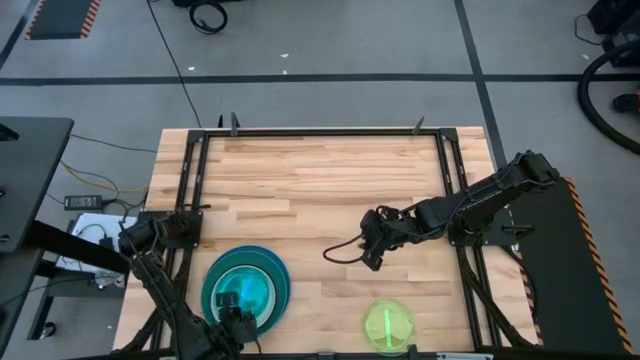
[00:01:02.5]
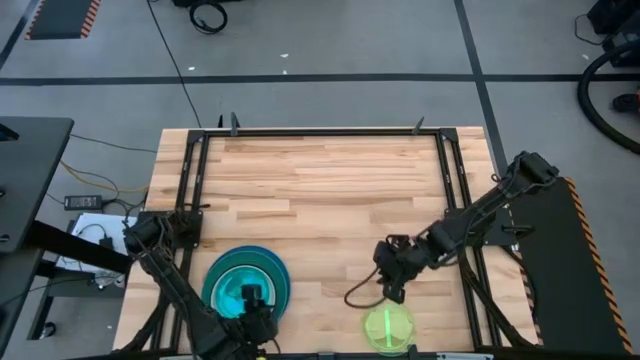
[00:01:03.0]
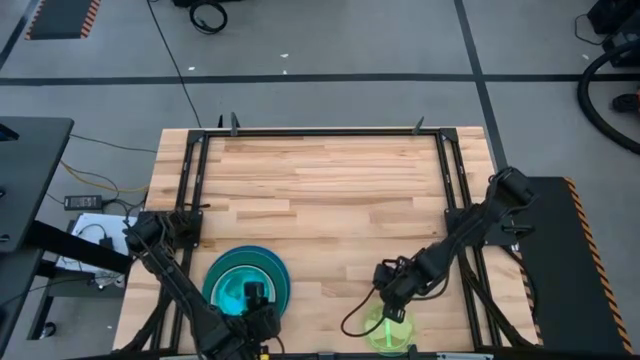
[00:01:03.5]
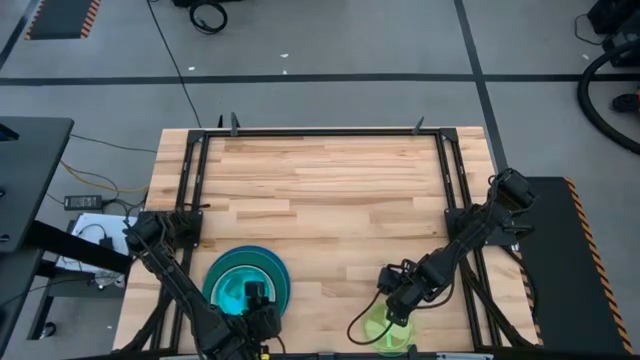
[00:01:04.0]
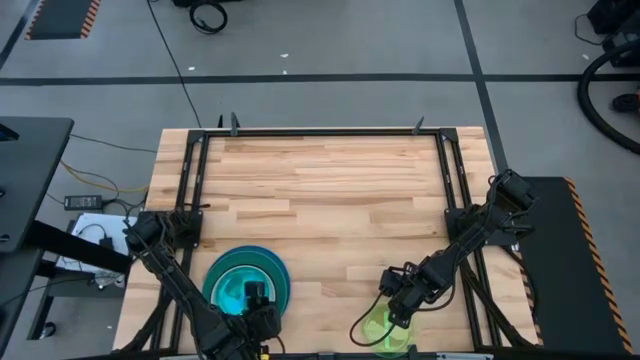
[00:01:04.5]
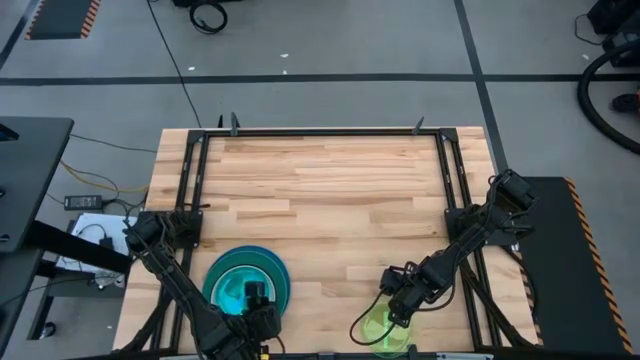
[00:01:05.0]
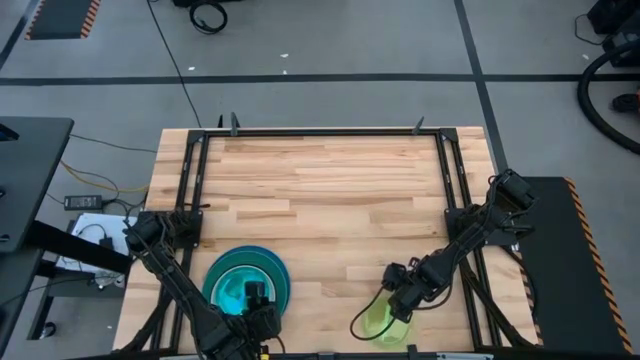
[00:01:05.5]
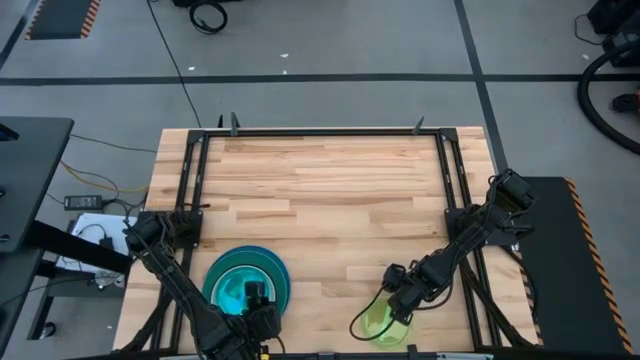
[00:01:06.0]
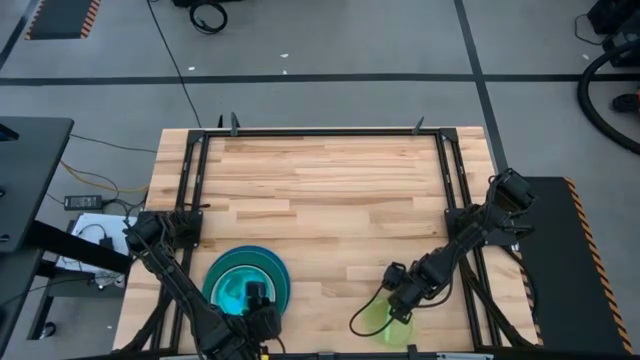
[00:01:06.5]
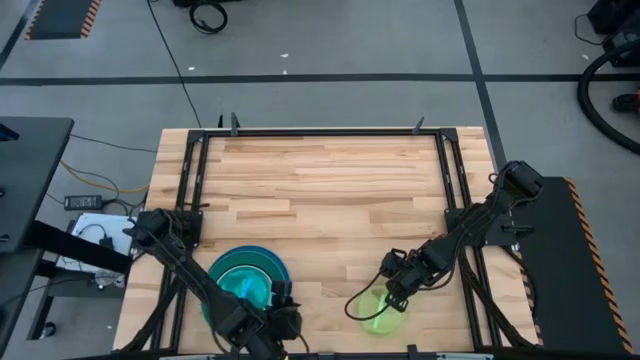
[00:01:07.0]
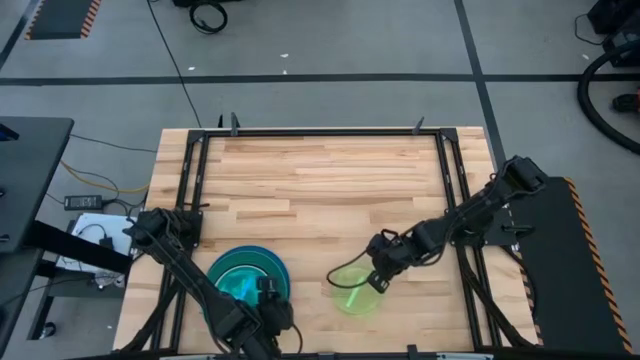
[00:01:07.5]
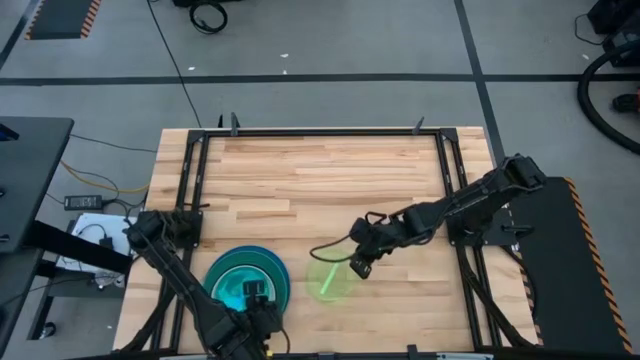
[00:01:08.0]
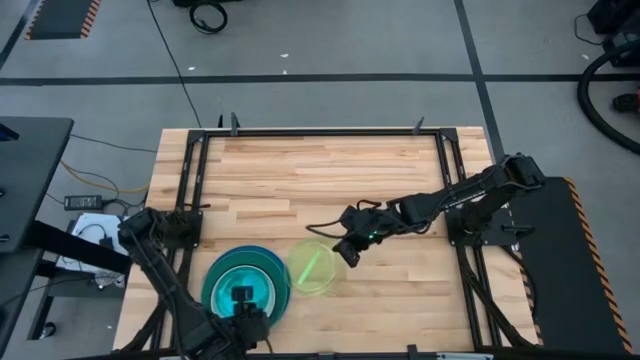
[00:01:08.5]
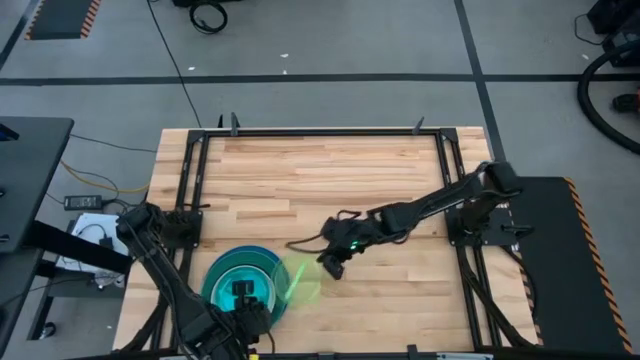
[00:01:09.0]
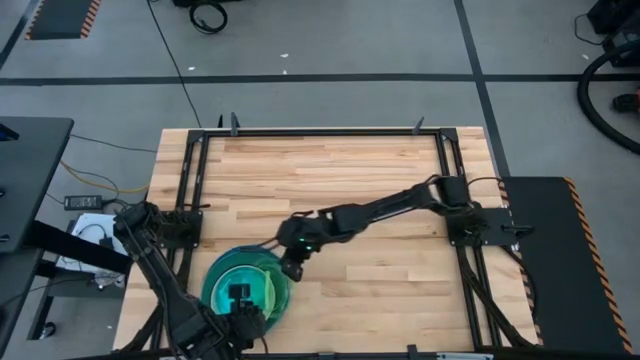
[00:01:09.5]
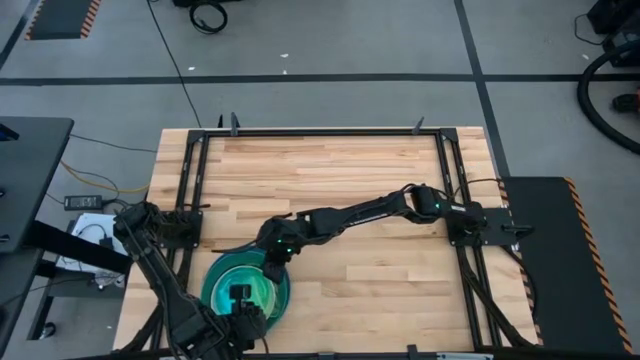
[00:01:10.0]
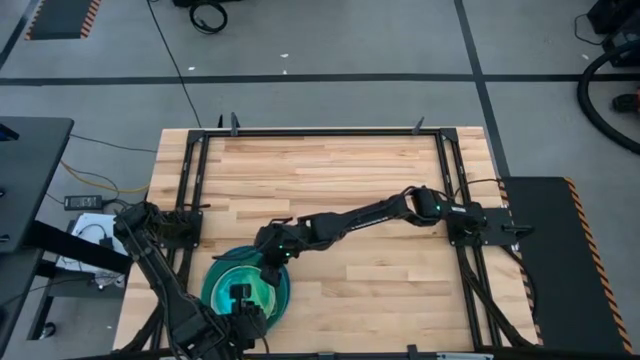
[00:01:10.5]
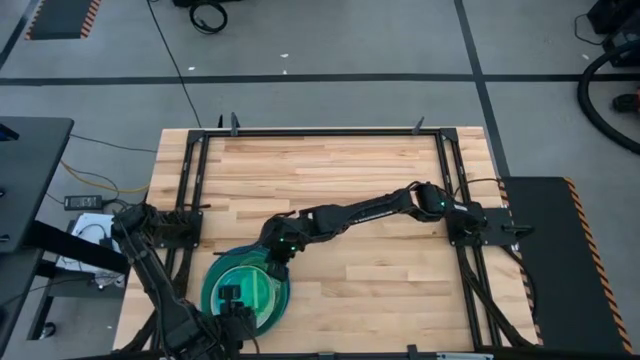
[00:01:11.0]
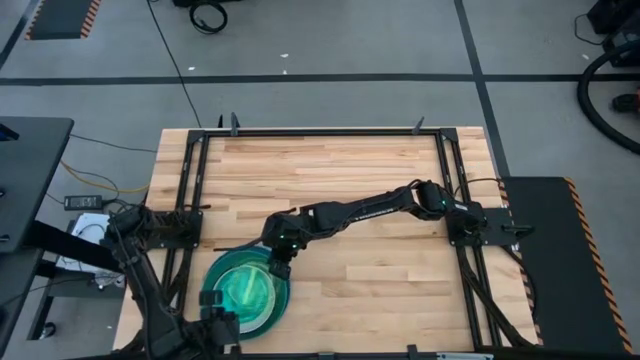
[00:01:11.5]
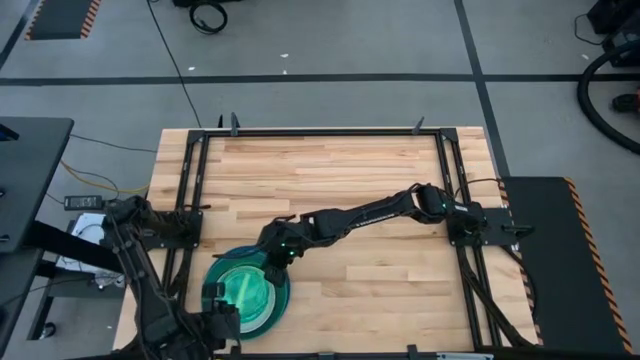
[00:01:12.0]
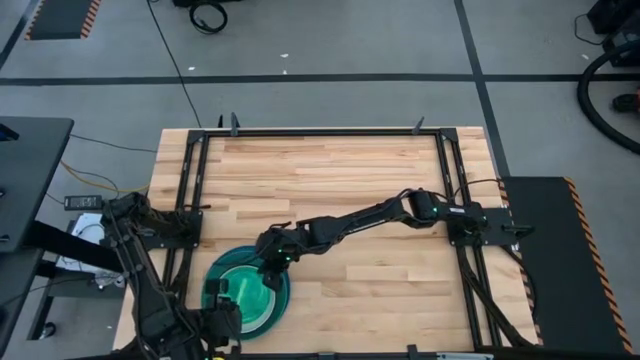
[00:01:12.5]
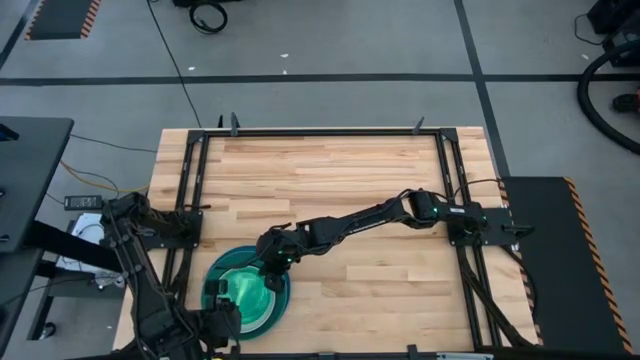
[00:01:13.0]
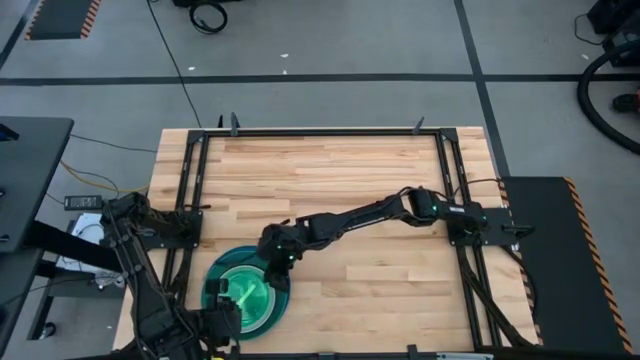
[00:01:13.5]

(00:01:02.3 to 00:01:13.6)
Task: Stack plastic plates
Stack the transparent yellow plate on the transparent blue plate

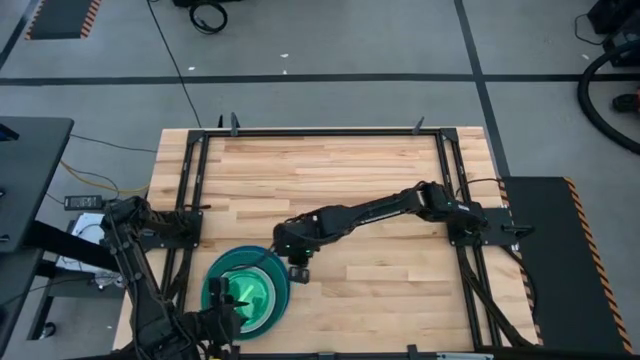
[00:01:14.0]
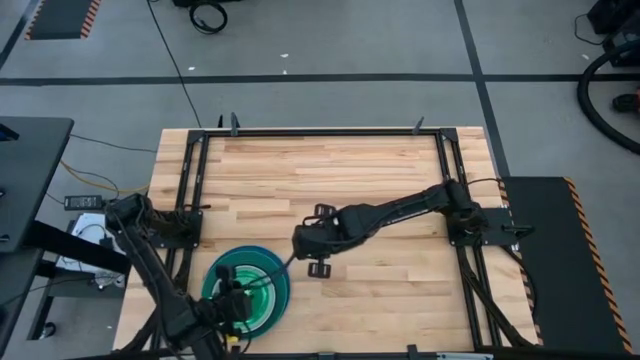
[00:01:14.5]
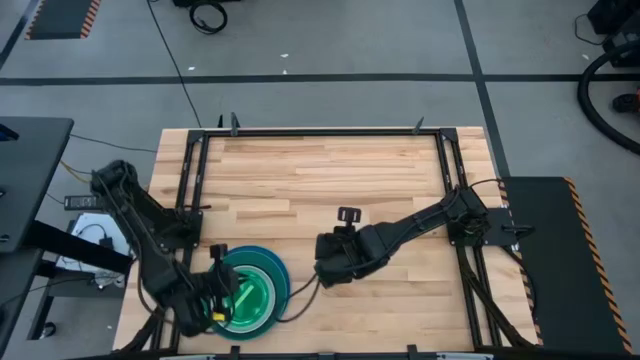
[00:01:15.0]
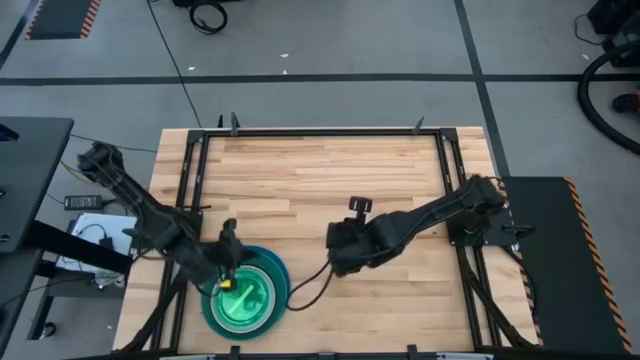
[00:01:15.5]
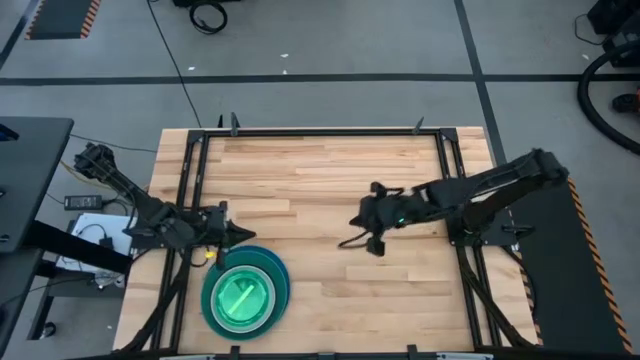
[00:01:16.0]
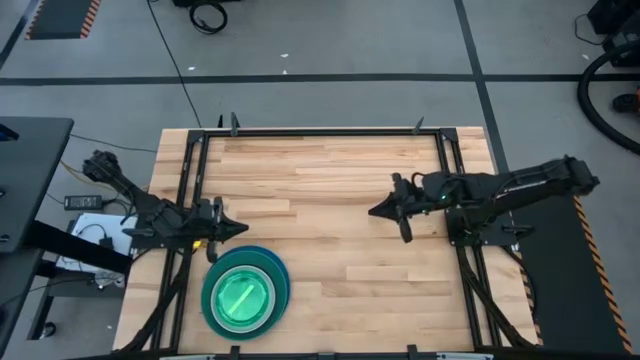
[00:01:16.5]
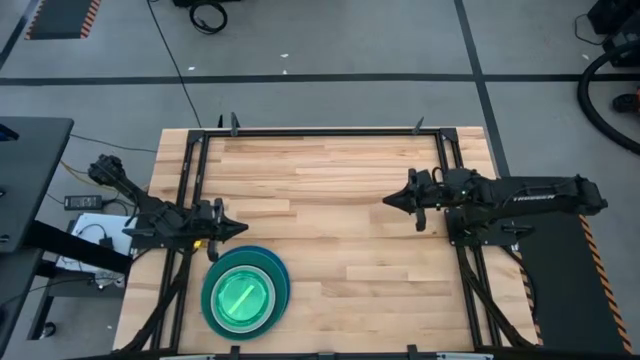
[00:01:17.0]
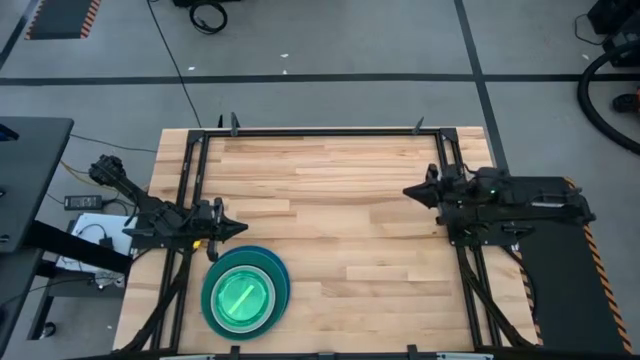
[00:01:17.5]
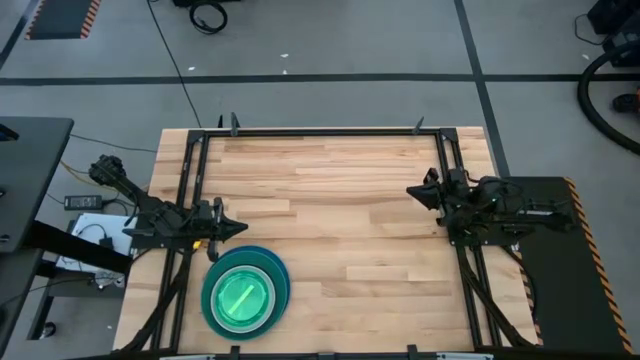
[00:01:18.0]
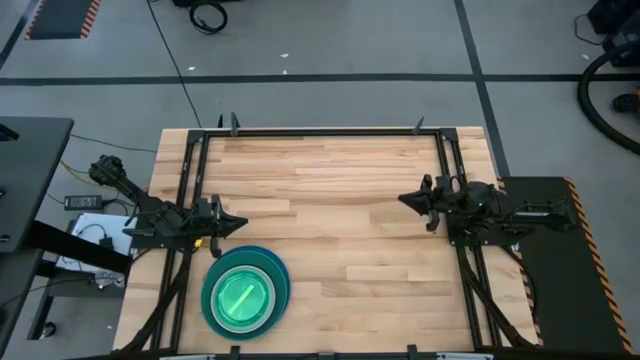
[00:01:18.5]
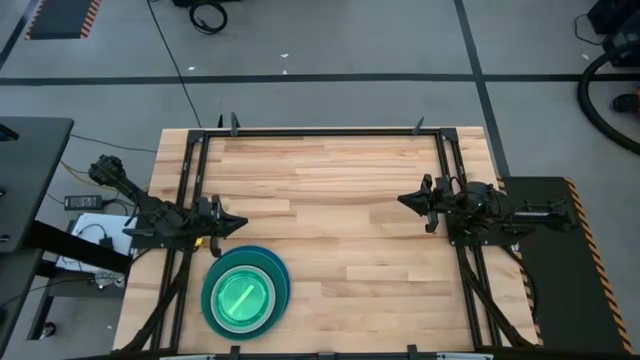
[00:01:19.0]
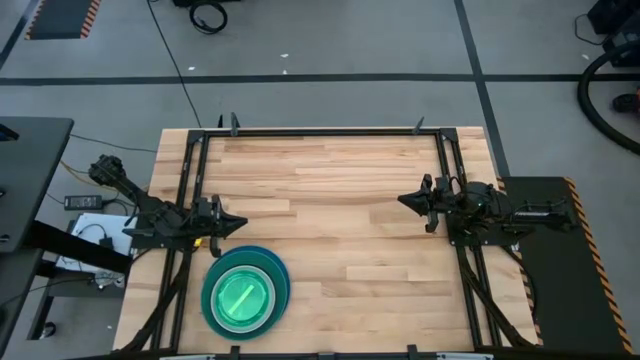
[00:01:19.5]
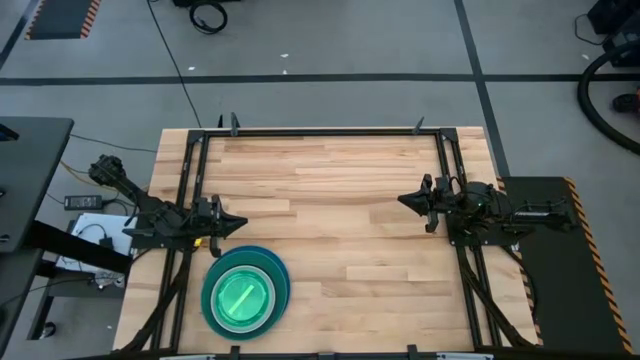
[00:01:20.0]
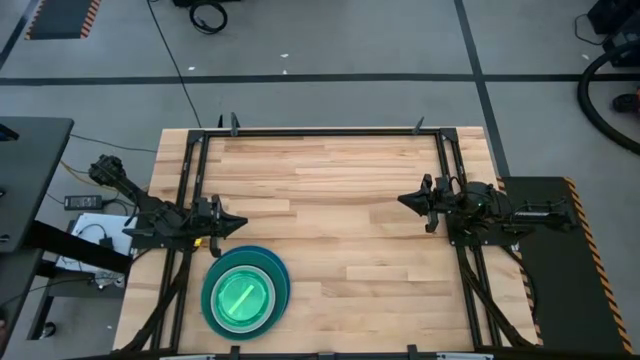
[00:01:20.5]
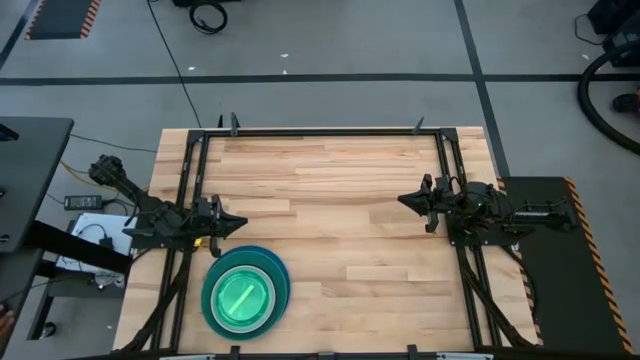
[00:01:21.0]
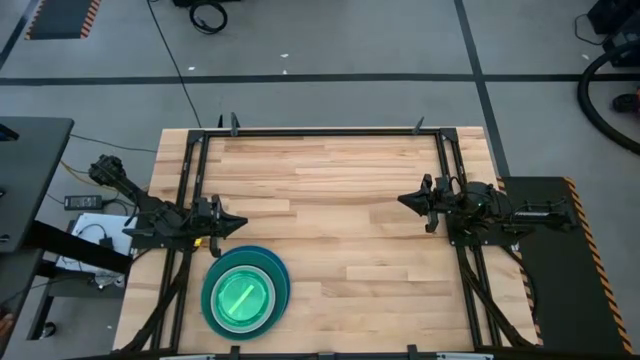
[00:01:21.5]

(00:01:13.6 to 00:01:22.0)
Return to Home Position

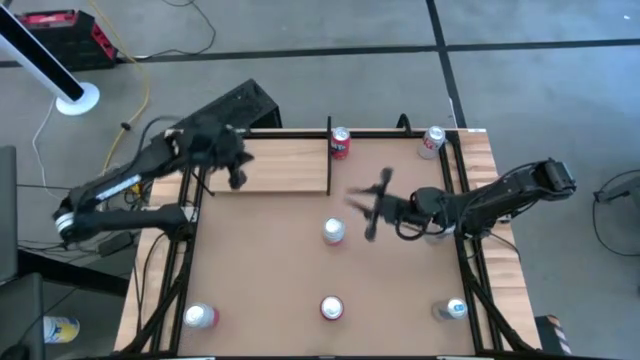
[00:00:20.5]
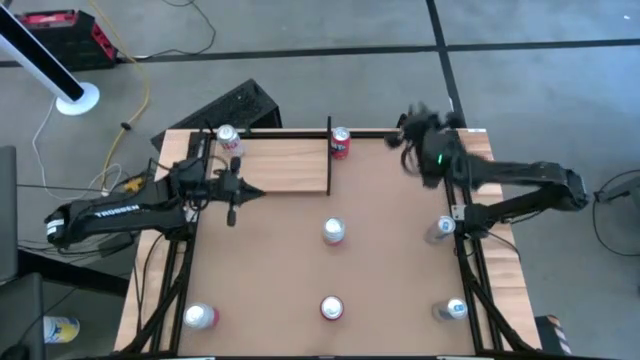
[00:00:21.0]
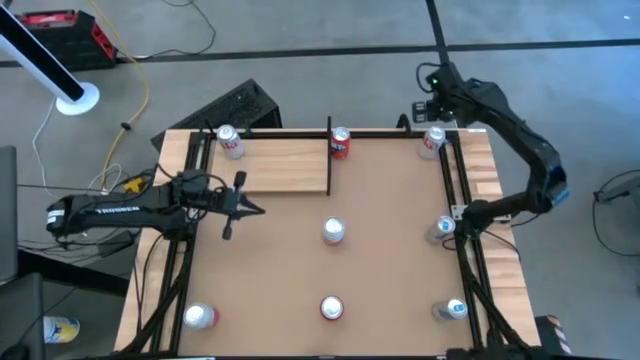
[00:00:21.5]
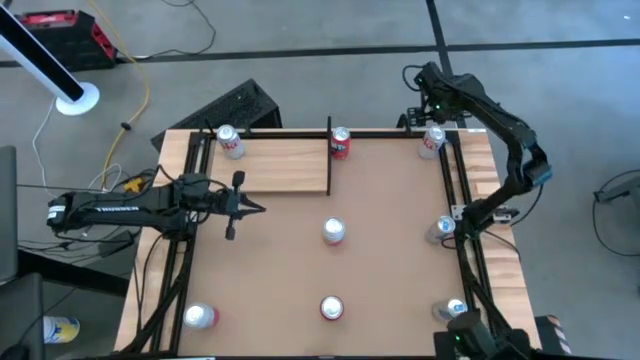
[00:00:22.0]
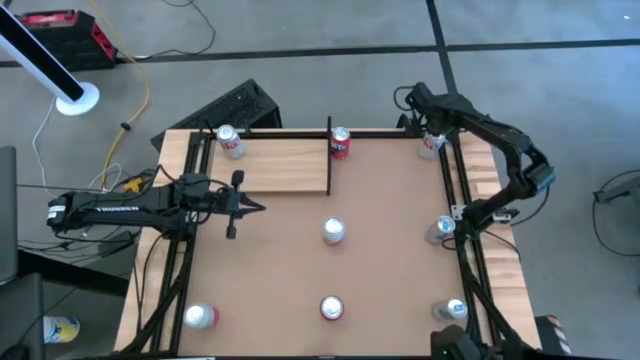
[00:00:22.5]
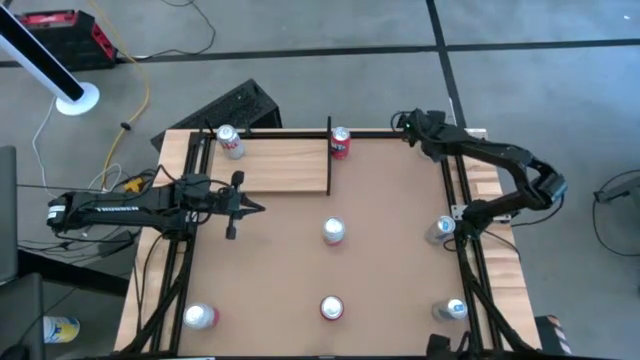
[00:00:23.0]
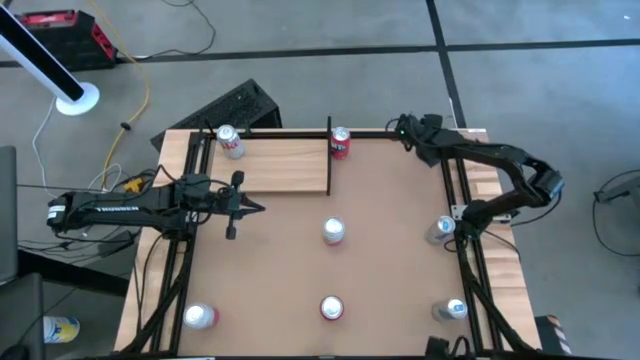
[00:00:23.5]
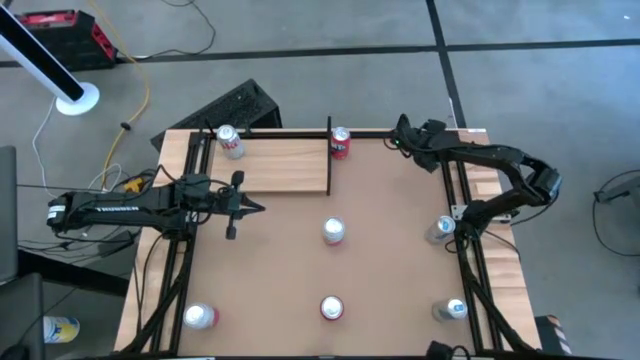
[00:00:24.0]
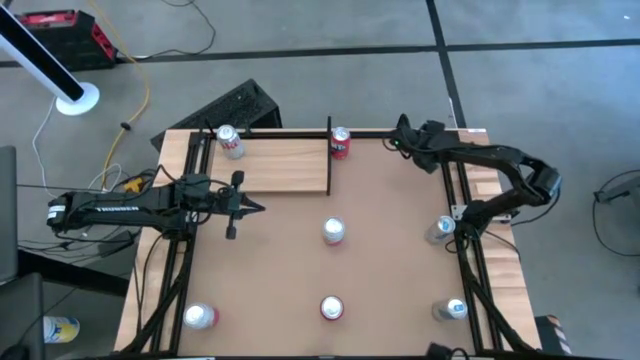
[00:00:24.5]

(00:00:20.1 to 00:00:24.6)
Task: Place canned beverage on shelf
Put the silver soda can on the shelf aligned with the other silver soda can
